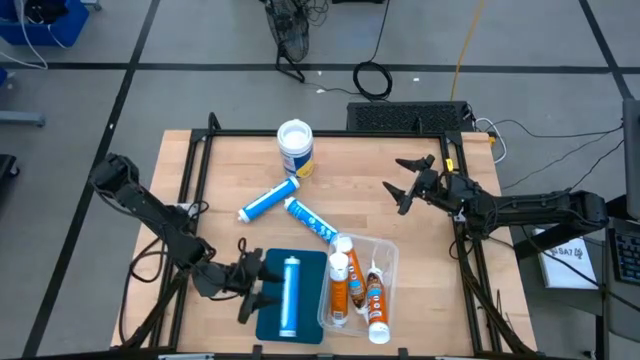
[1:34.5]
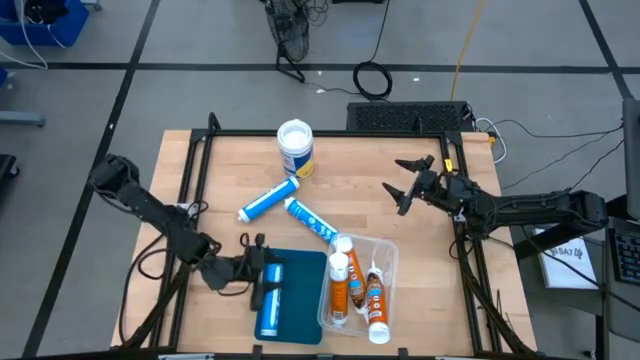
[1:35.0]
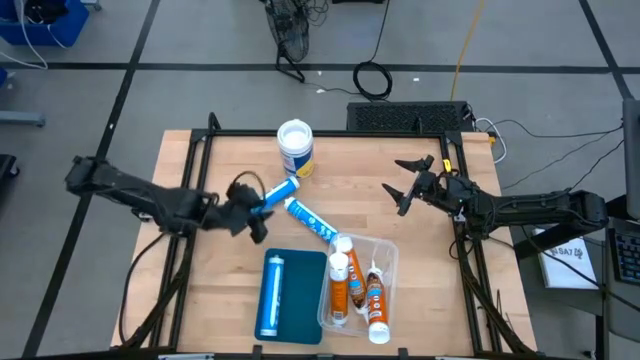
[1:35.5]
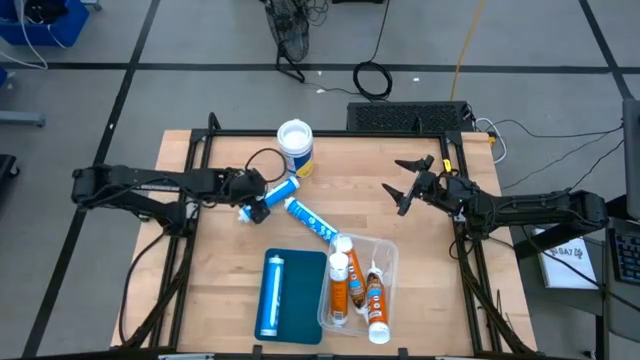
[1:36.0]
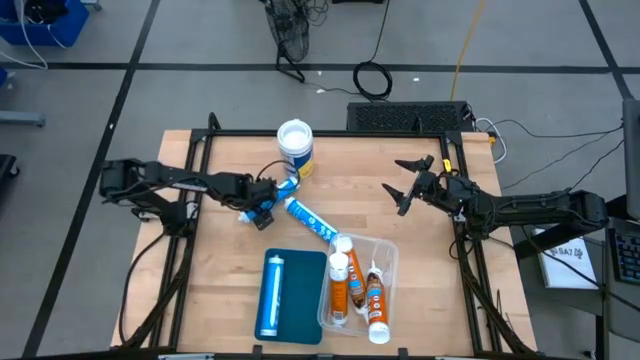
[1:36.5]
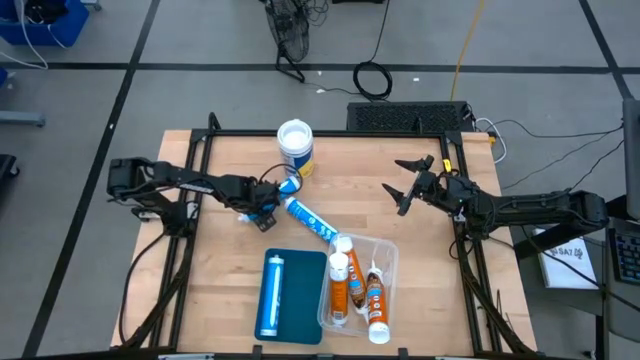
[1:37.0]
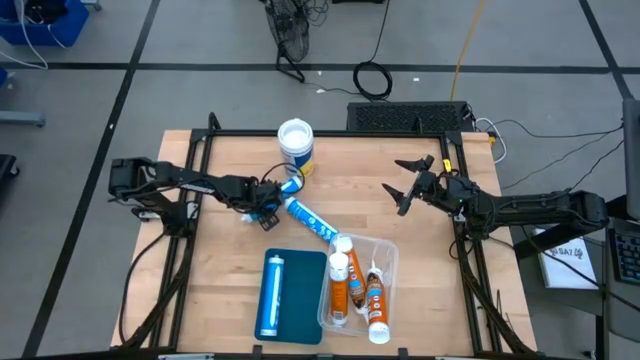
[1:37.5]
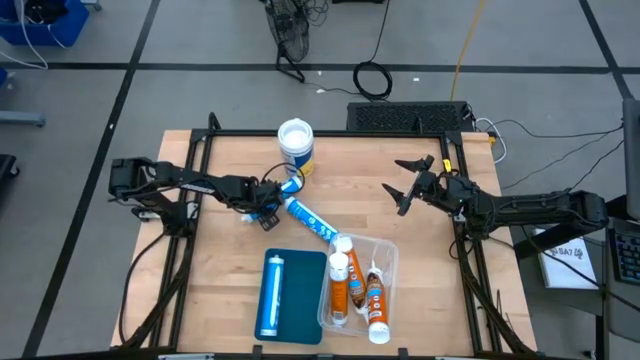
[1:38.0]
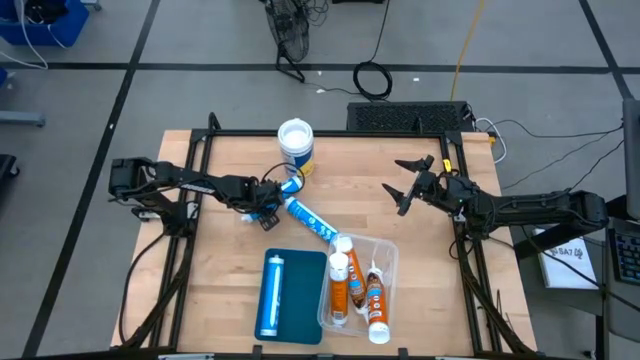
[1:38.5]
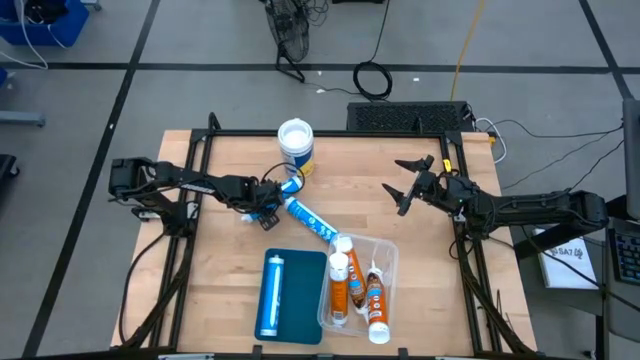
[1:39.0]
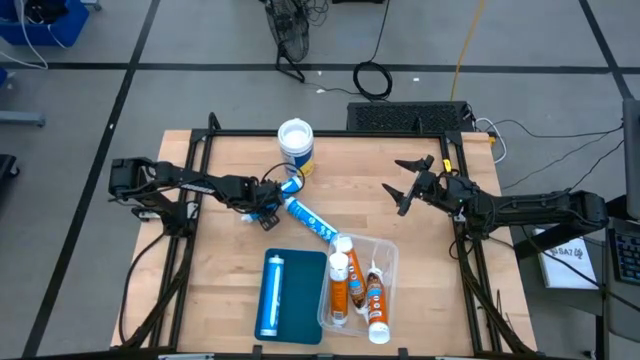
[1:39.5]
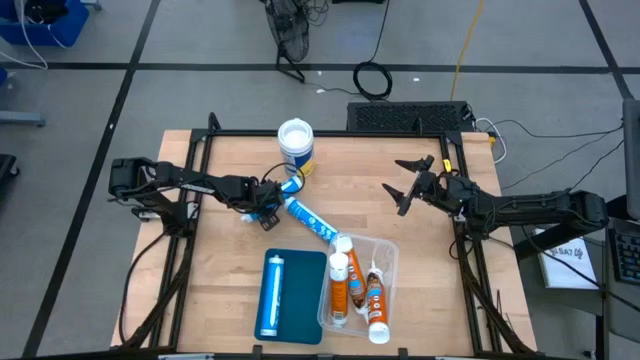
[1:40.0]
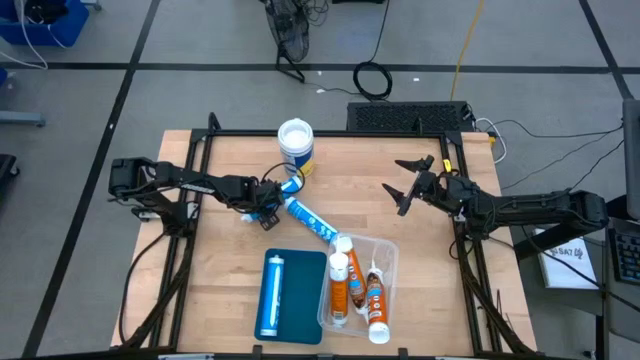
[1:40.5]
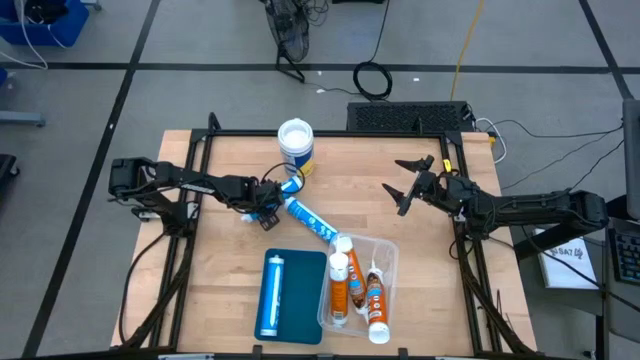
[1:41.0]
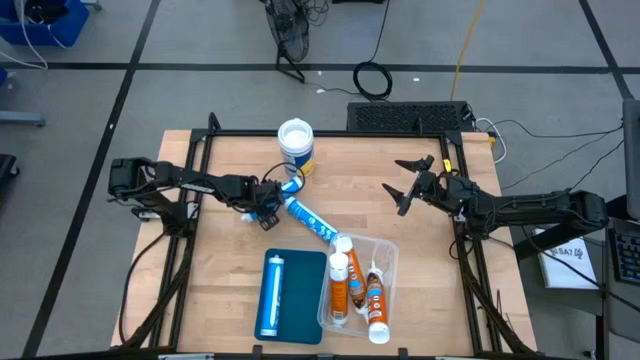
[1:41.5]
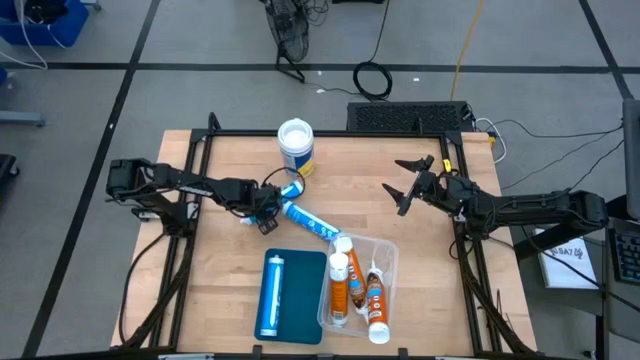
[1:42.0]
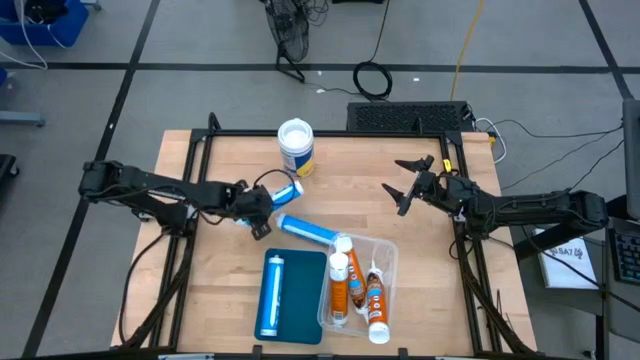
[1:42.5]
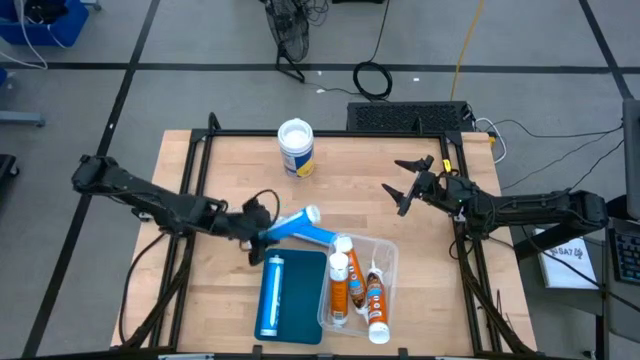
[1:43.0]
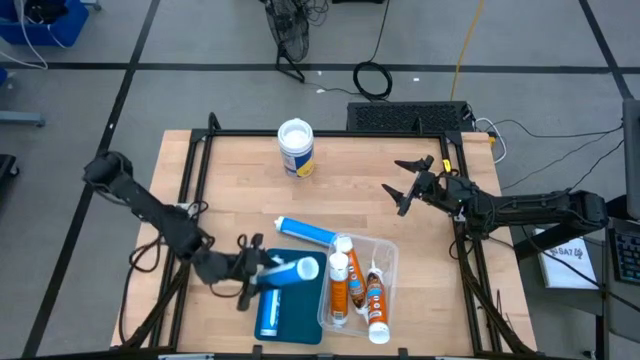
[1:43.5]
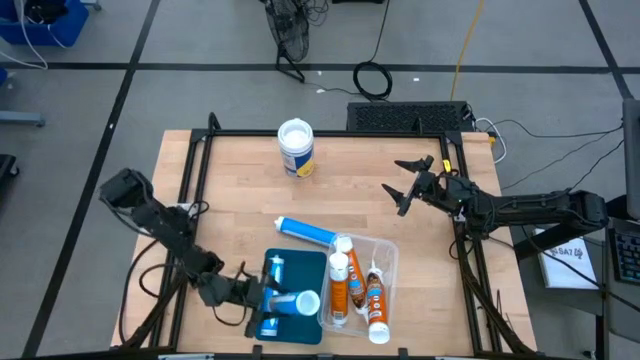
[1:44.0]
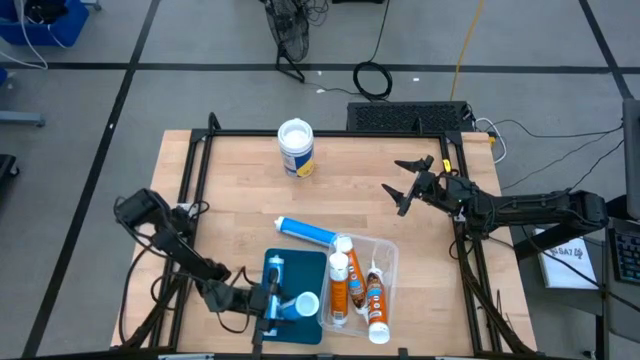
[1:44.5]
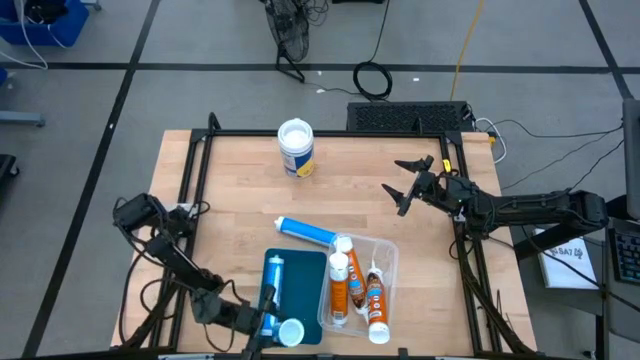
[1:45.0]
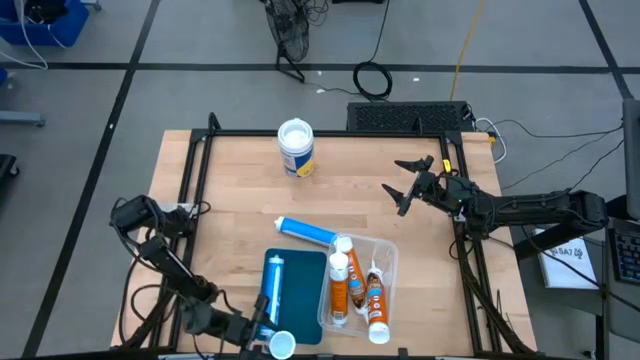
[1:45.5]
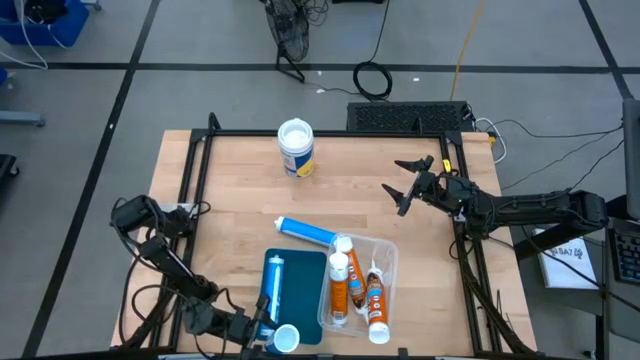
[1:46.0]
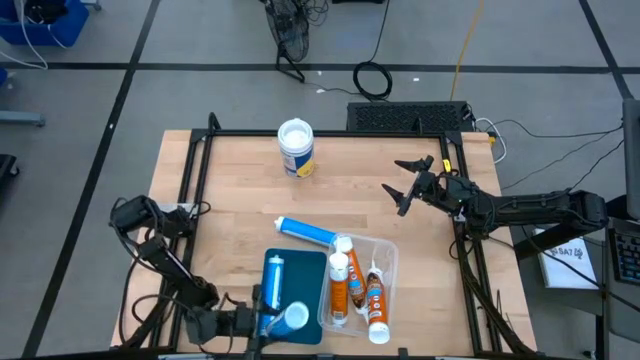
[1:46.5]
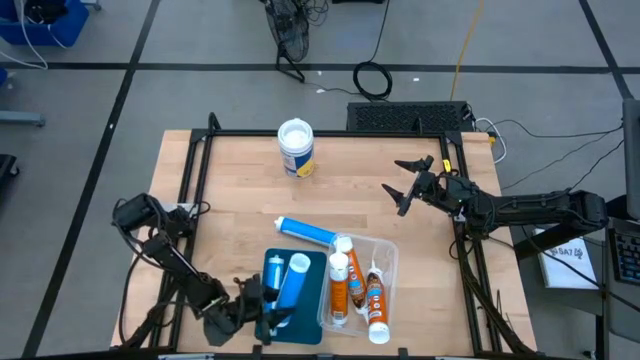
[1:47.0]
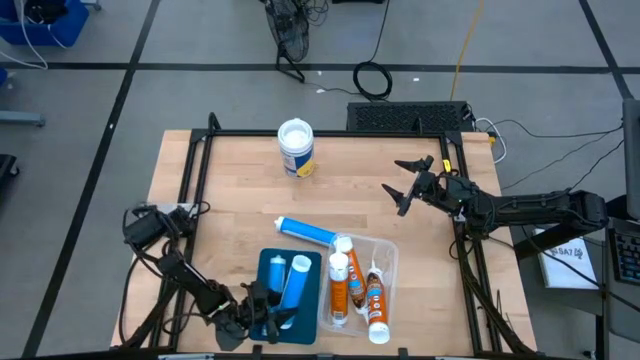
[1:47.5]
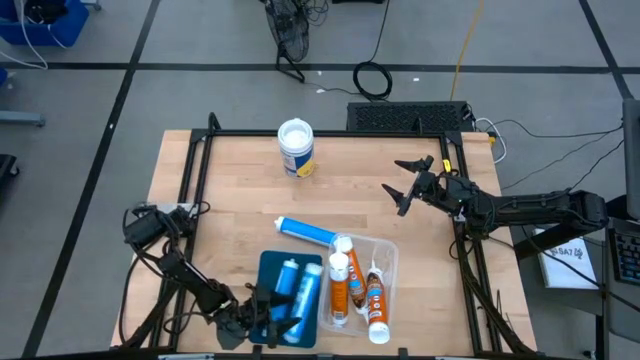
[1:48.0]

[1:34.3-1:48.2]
Task: Pick & place silicon tubes, Sealant and Lysol wipes
Put the left blue sealant into the blue bin

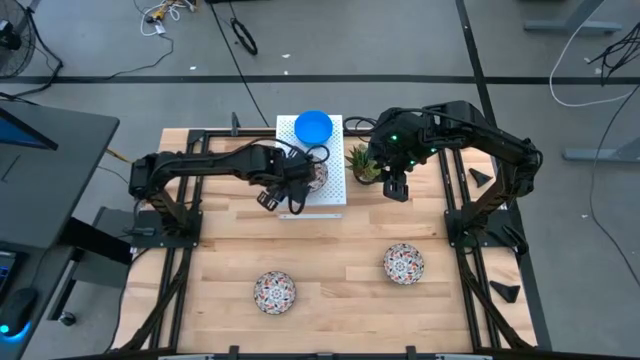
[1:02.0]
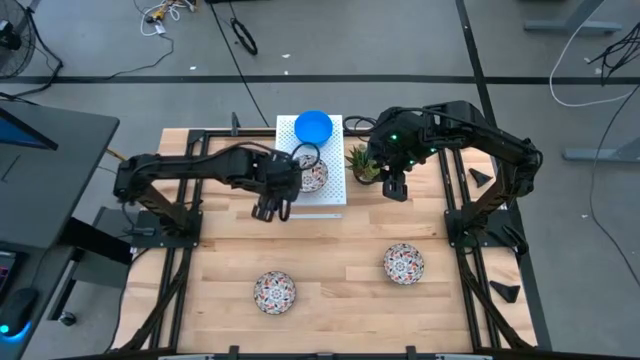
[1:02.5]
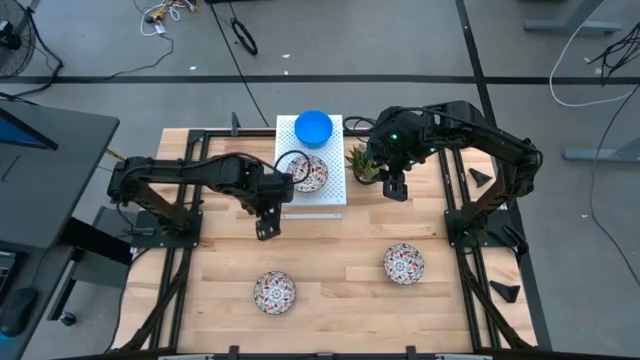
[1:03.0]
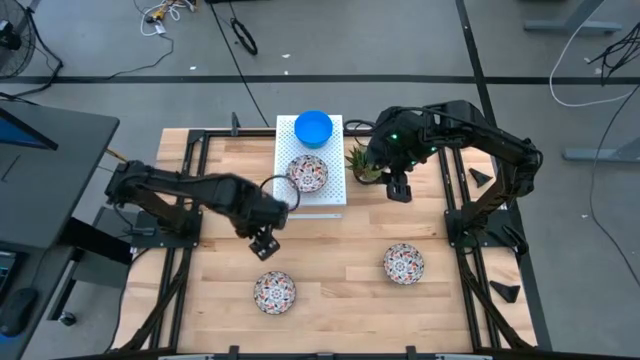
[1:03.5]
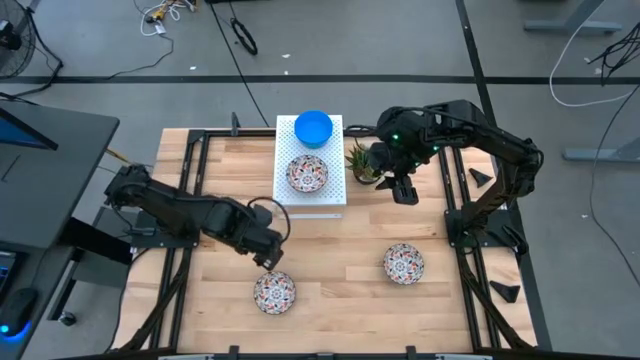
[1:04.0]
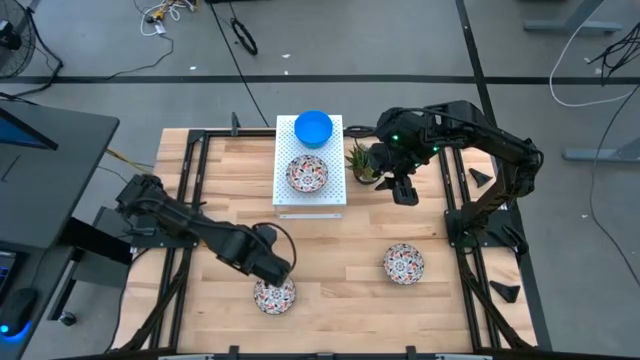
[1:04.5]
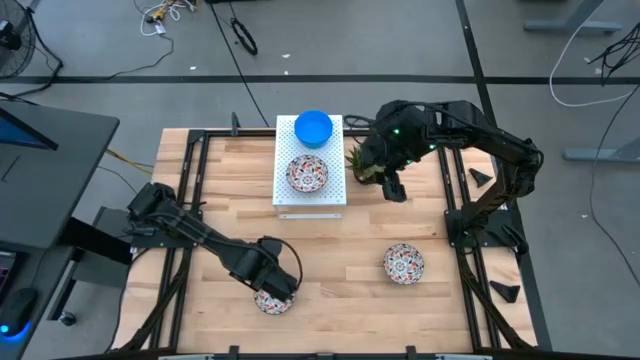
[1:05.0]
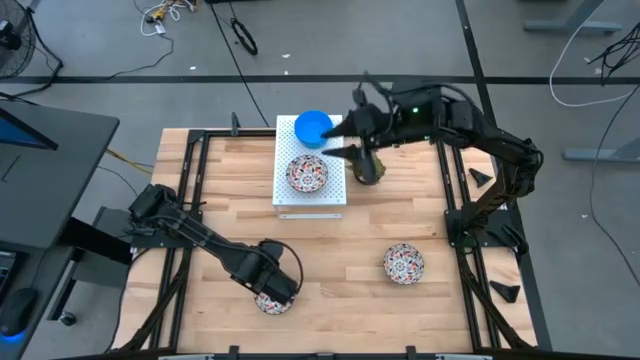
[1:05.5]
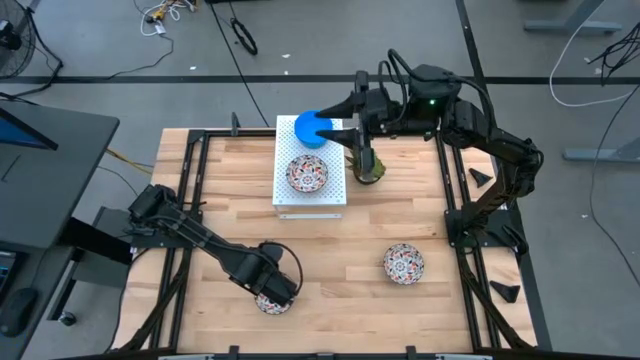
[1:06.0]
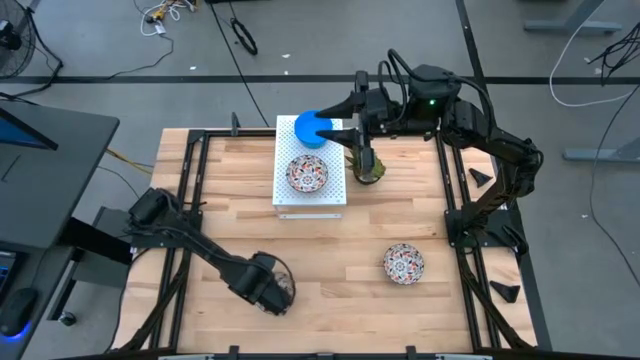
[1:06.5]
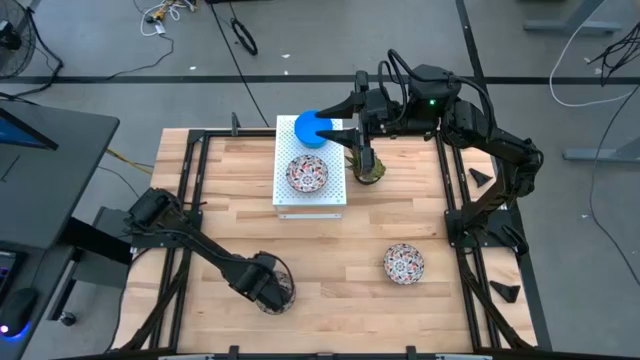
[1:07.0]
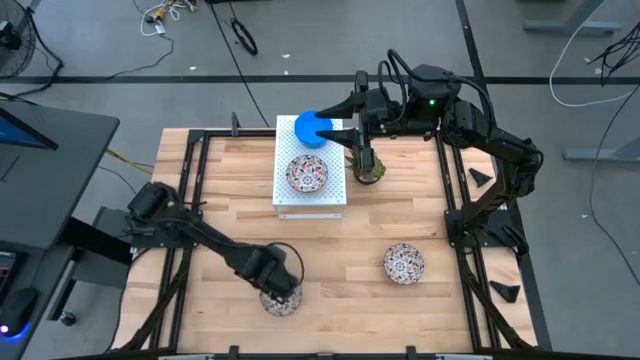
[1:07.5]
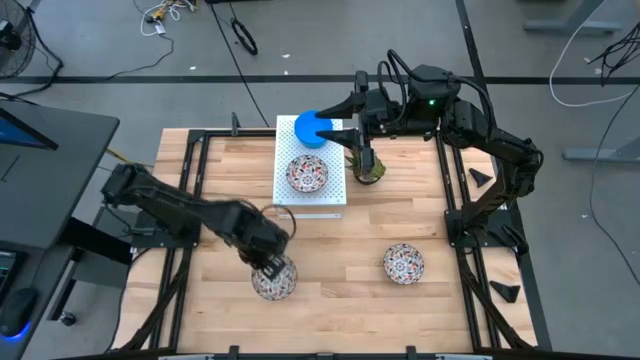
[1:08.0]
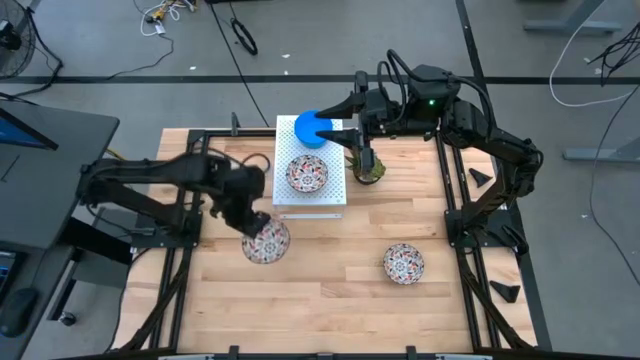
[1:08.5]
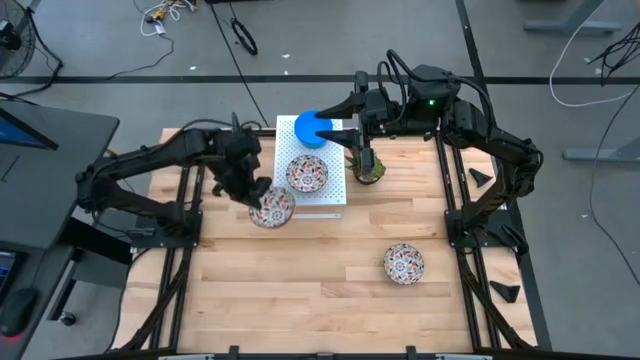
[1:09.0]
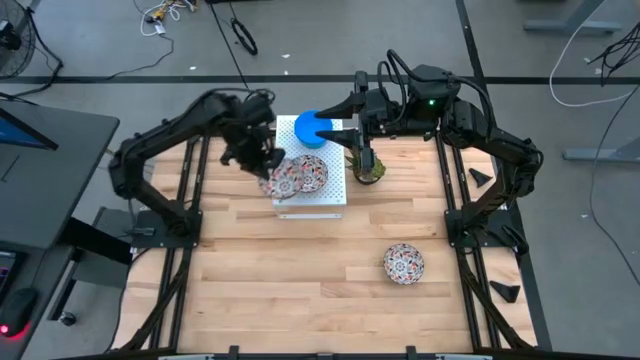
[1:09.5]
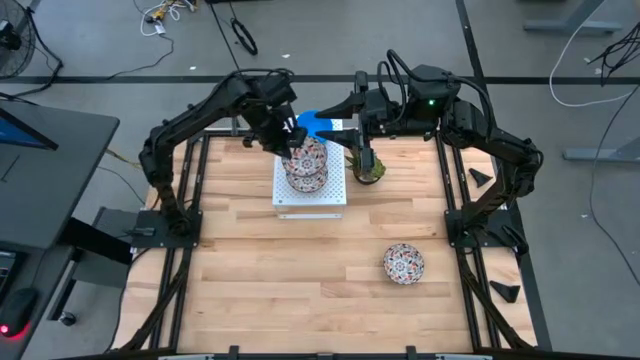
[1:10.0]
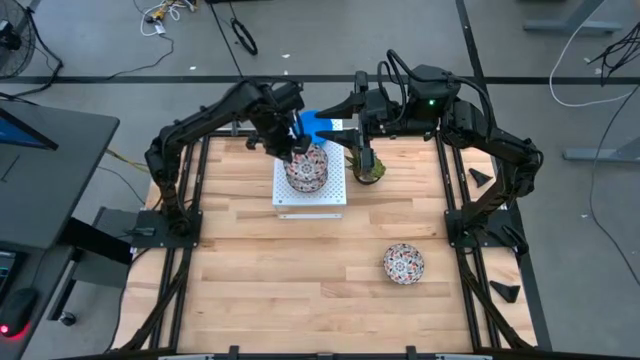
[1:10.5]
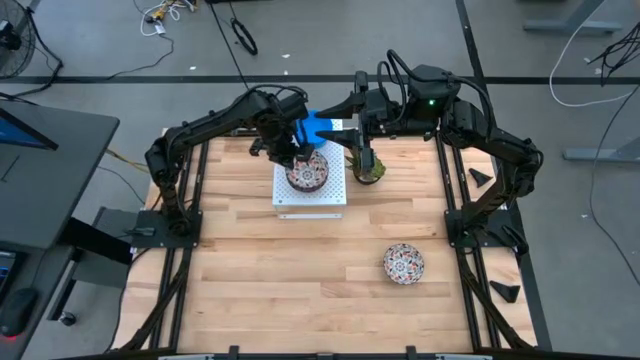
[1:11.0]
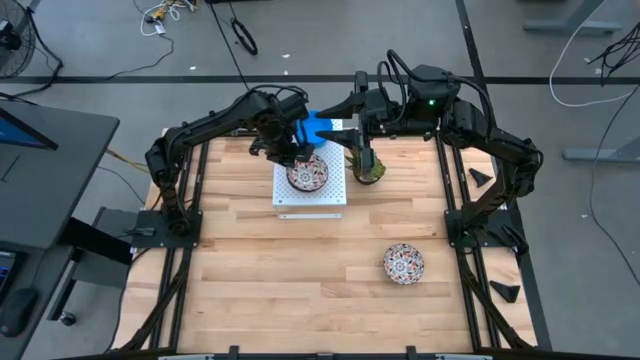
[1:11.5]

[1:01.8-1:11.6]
Task: Pick & Place Mini bowls
Stack the bottom white patterned bowl on top of the white patterned bowl on the shelf
